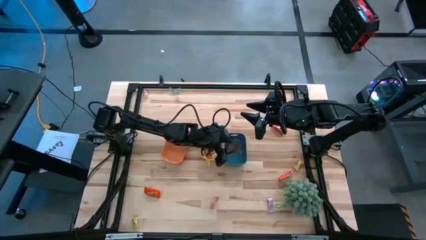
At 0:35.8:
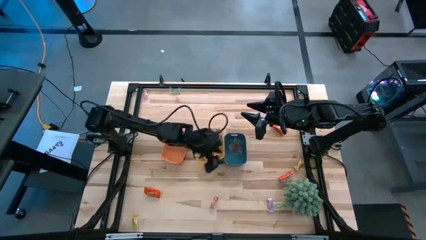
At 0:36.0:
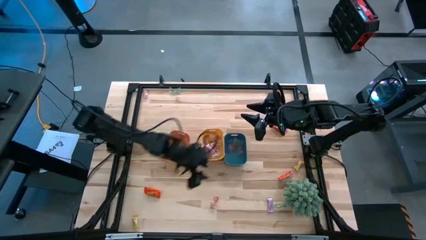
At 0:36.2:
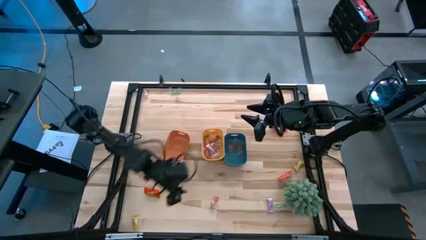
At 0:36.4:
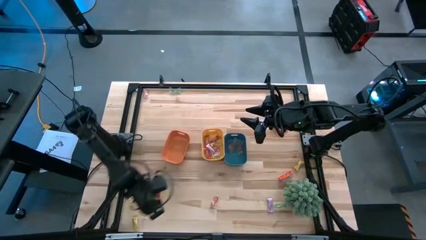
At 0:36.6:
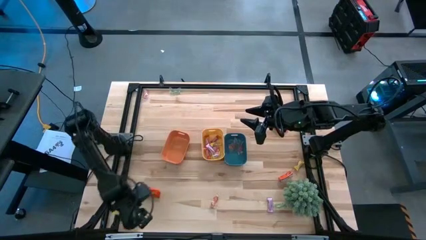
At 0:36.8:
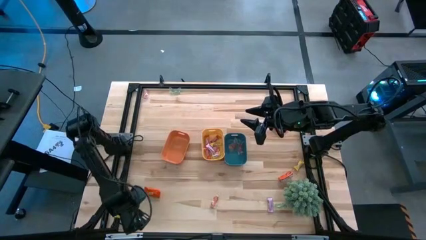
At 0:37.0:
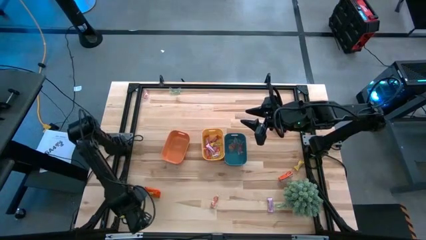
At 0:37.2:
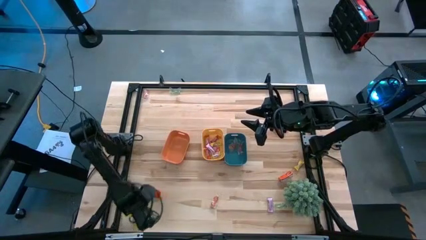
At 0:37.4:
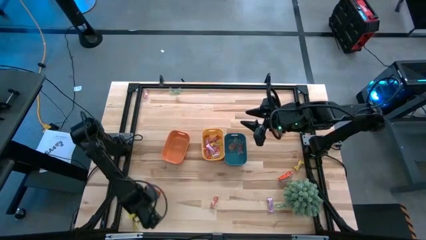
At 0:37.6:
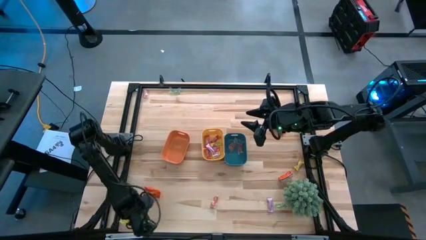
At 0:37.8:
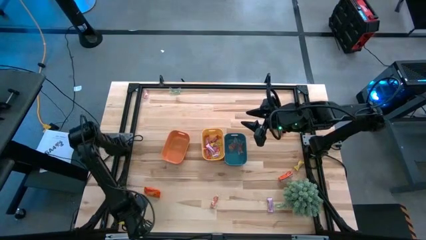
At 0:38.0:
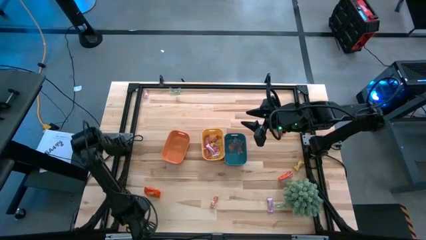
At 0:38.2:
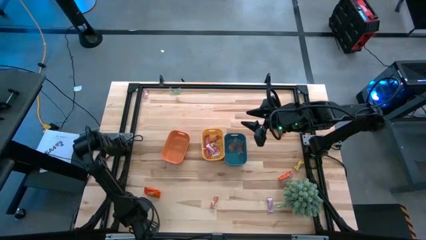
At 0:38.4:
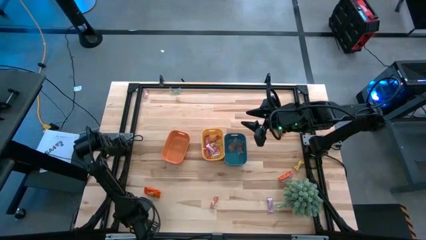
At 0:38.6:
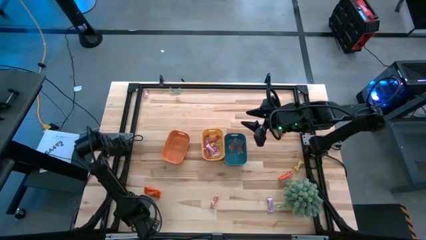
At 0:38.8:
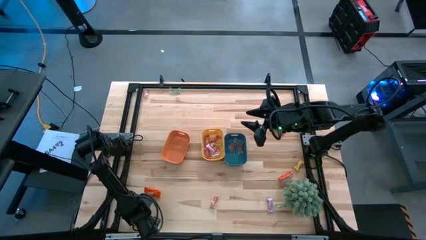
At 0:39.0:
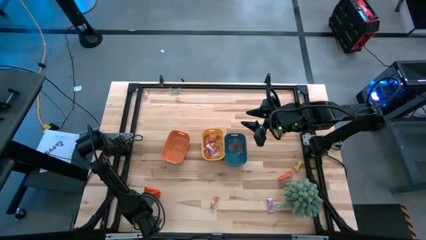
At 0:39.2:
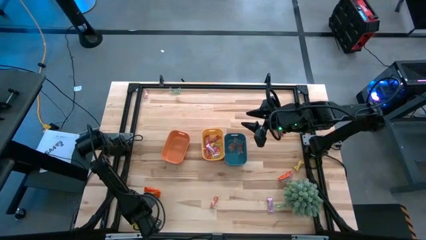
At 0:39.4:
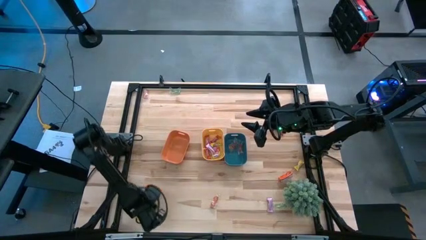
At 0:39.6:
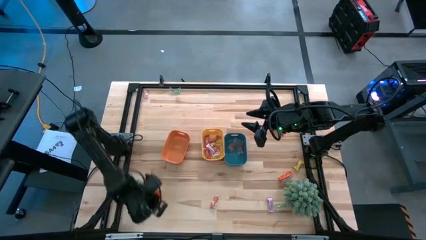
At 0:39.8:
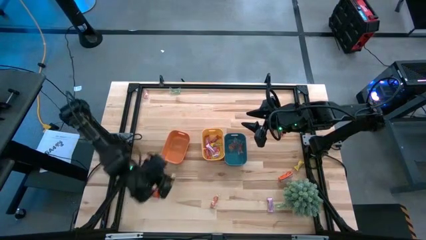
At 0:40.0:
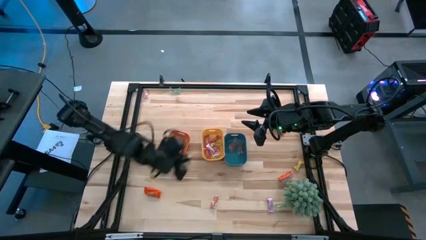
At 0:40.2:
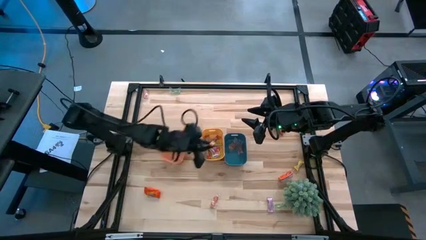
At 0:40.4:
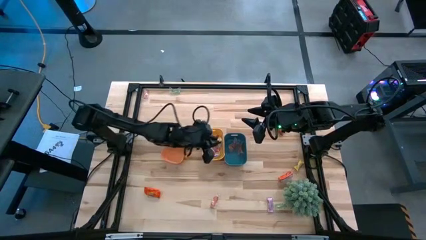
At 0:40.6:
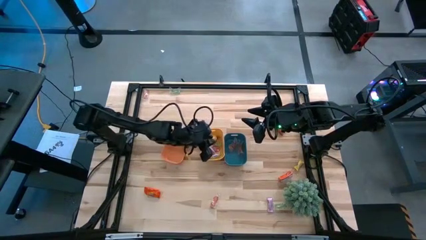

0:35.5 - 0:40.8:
Task: Sort candy
Put the yellow candy into the yellow bin

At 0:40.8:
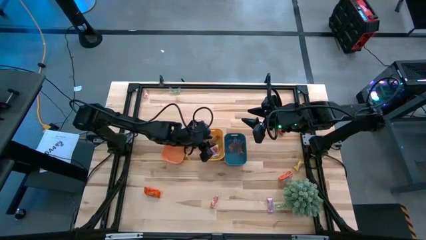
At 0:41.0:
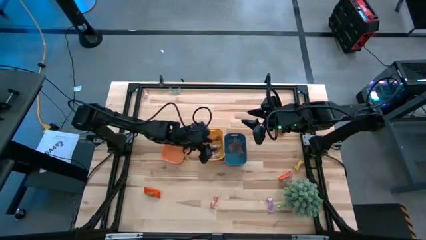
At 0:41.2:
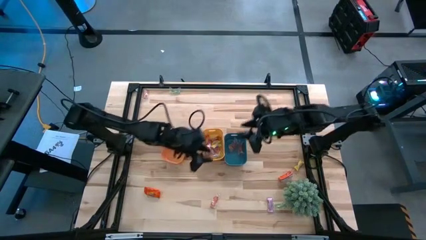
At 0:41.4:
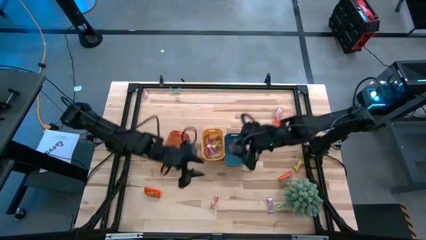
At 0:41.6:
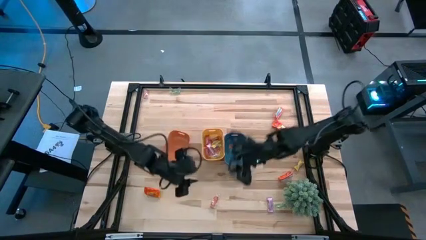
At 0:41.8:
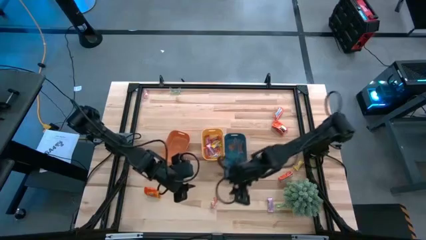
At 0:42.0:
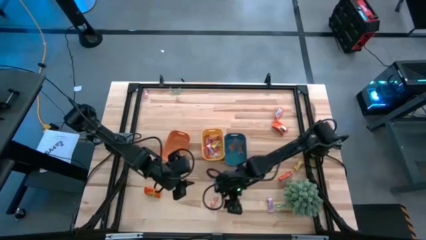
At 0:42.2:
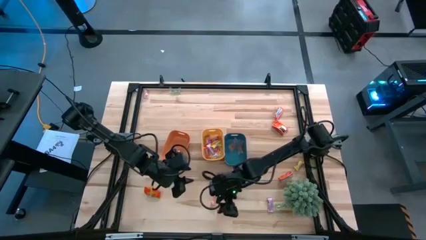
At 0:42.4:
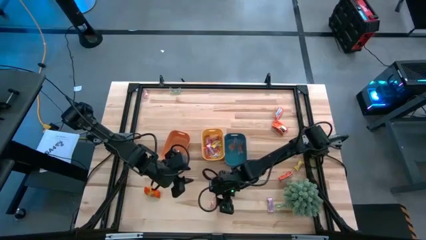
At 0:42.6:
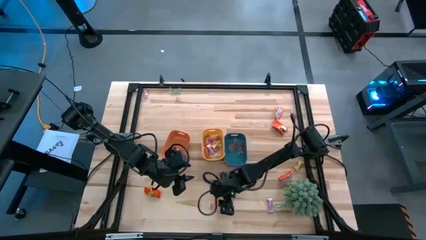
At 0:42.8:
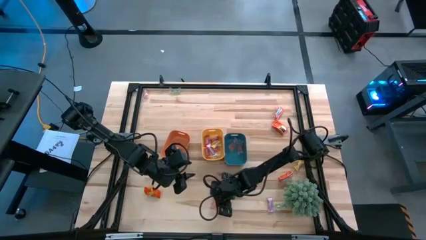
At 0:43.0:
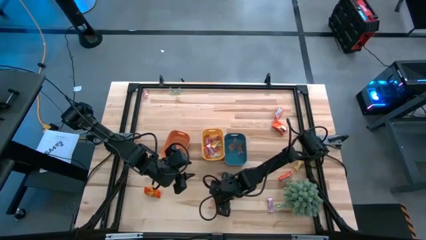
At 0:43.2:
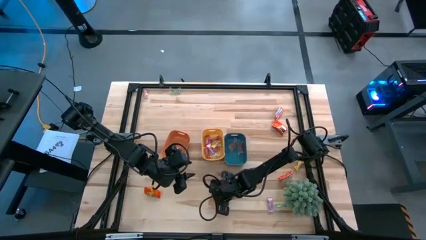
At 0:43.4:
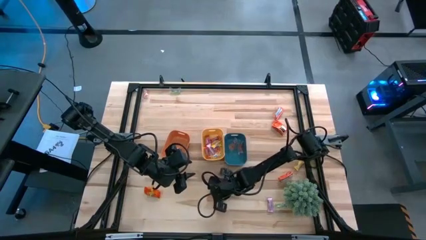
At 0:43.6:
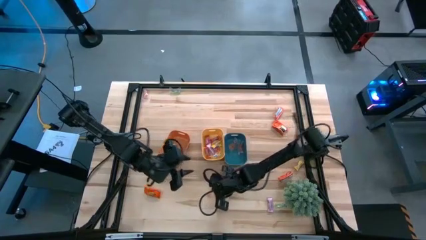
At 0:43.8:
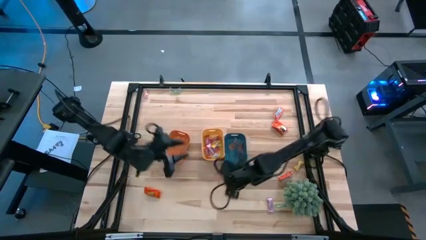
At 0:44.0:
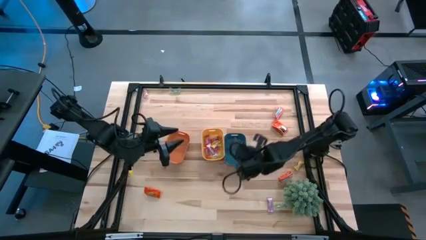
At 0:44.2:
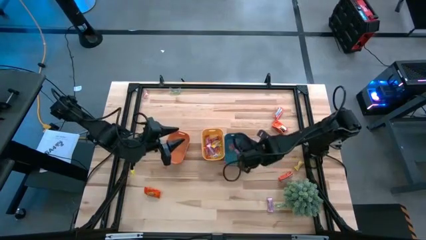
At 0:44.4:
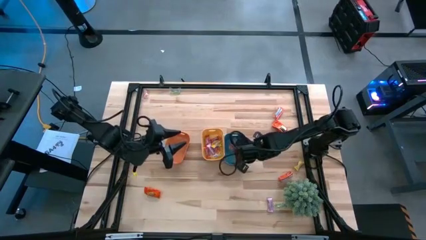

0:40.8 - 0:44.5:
Put the orange gummy into the blue bin

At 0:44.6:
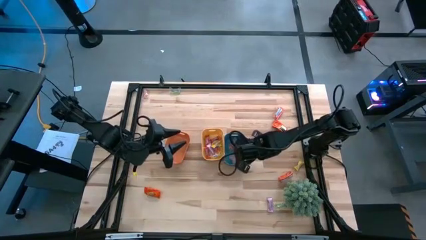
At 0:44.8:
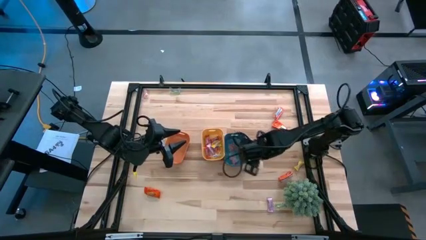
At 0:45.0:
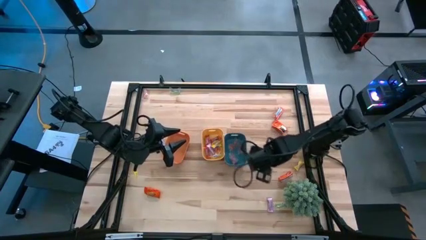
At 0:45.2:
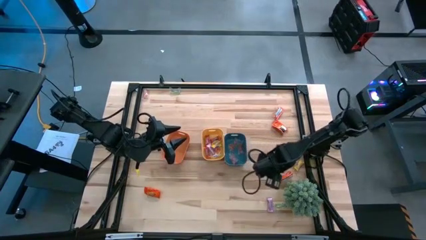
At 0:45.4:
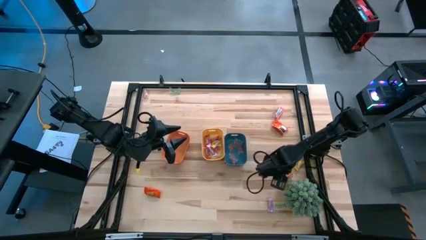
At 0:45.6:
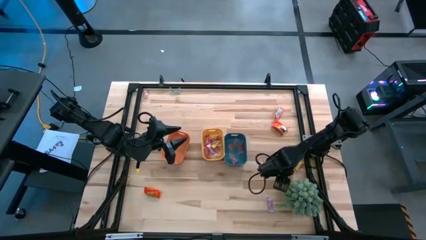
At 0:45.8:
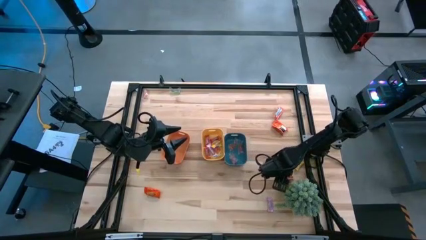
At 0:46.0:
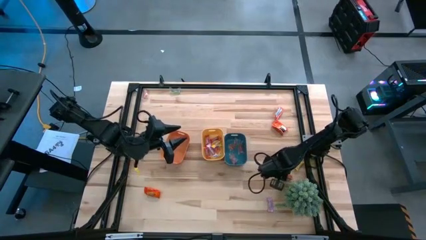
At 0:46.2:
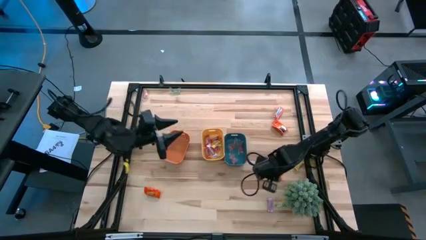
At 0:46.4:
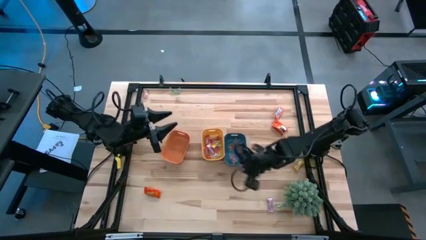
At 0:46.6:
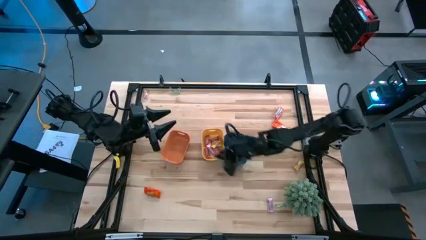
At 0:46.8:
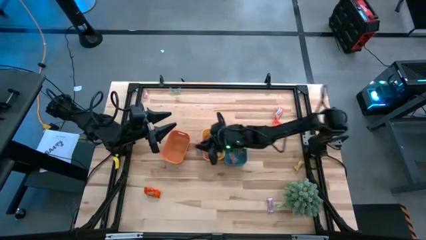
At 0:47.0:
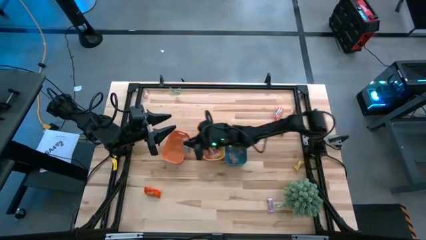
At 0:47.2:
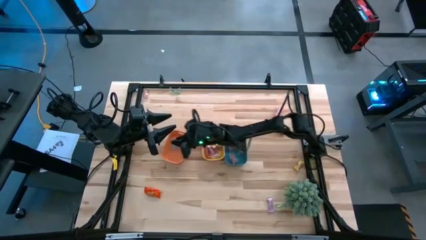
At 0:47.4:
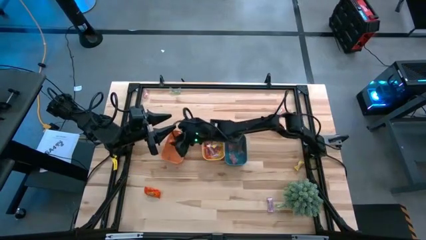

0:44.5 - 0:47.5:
Put the orange chocolate into the orange bin

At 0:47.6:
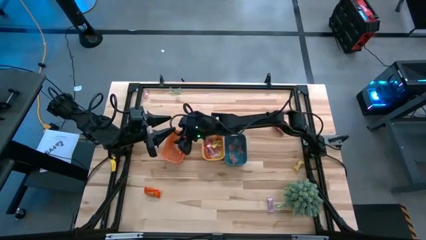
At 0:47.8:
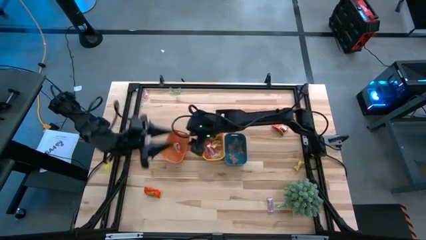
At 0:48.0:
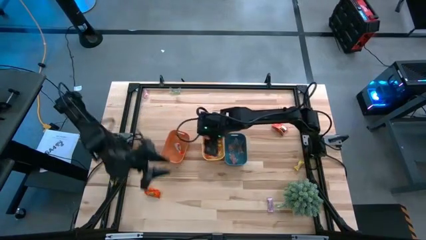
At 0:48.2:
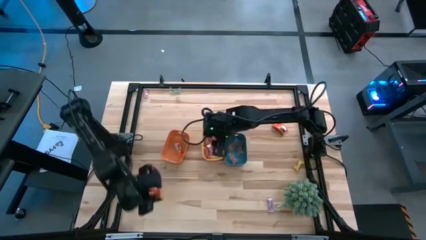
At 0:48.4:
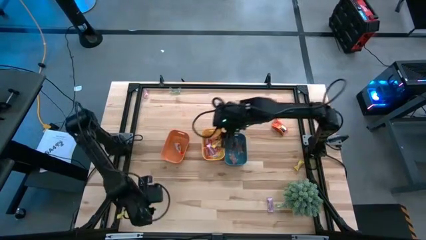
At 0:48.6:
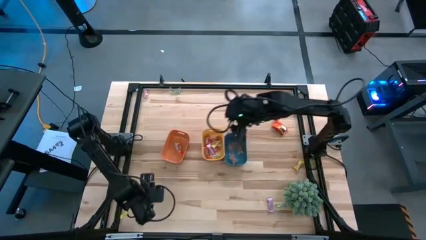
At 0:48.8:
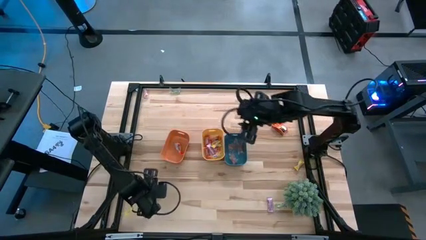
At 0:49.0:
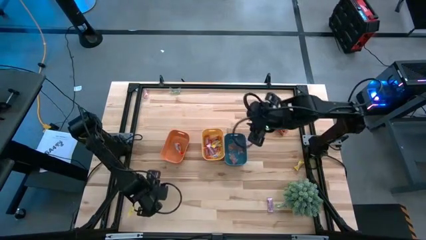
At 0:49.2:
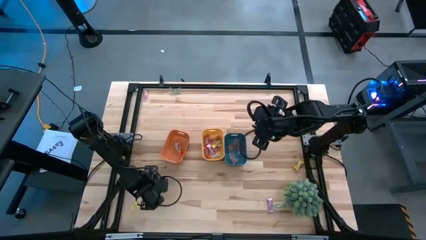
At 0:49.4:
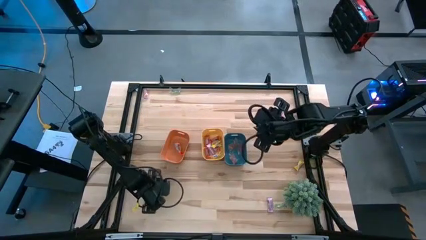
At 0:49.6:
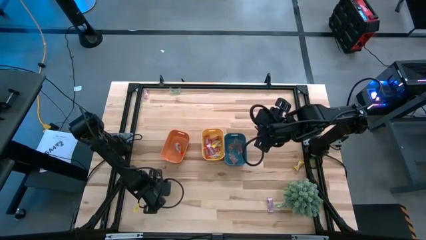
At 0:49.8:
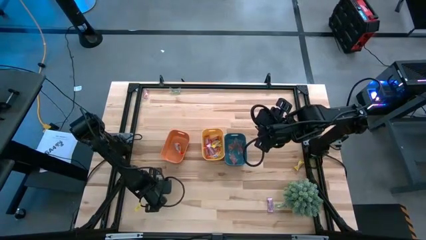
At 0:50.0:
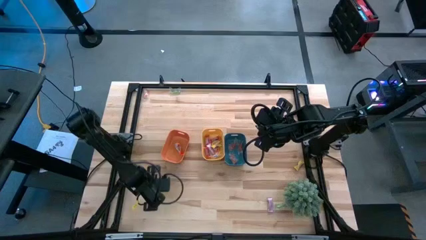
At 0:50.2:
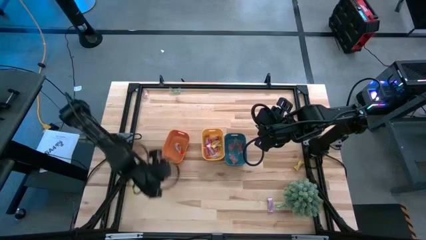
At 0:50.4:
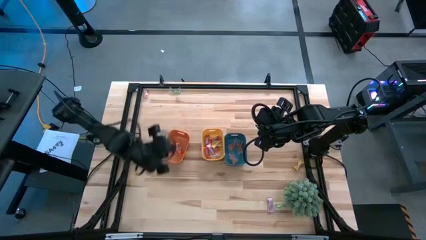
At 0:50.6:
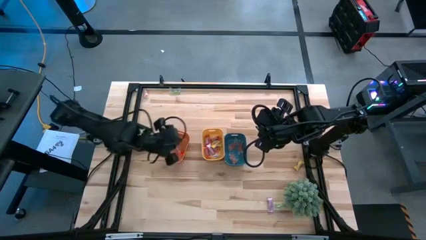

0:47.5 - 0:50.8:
Put the orange chocolate into the orange bin

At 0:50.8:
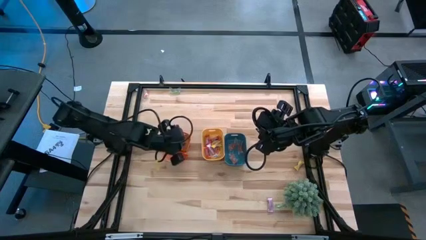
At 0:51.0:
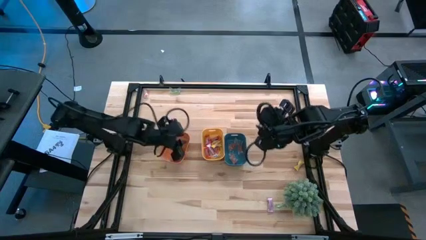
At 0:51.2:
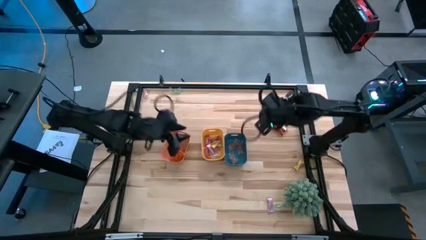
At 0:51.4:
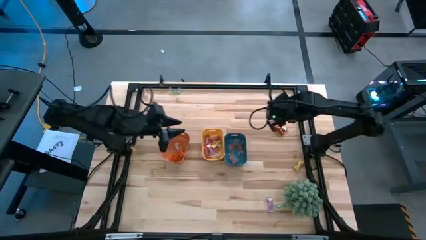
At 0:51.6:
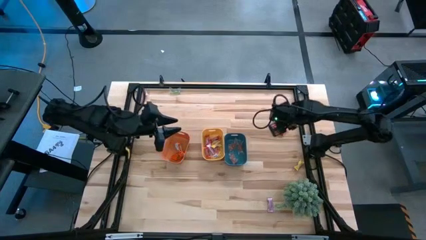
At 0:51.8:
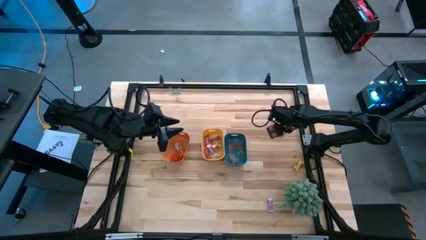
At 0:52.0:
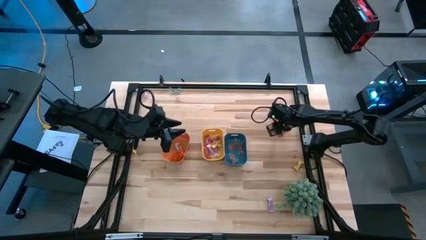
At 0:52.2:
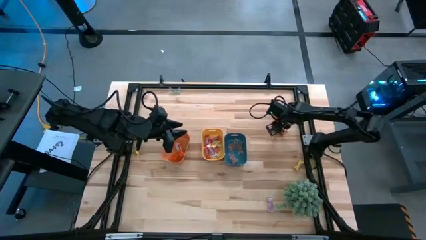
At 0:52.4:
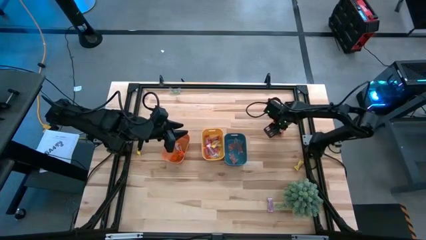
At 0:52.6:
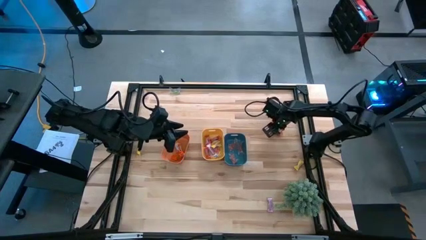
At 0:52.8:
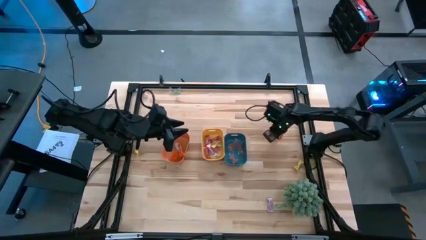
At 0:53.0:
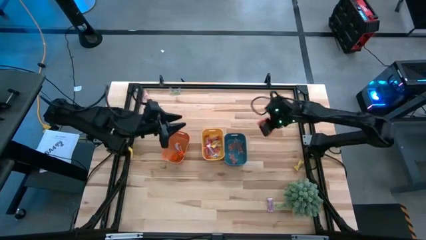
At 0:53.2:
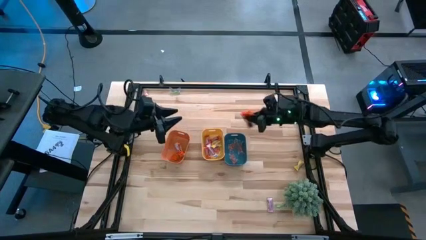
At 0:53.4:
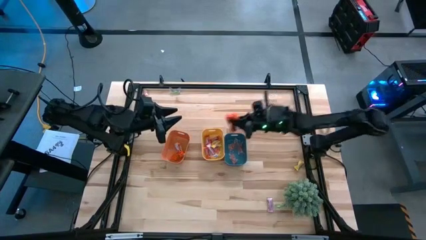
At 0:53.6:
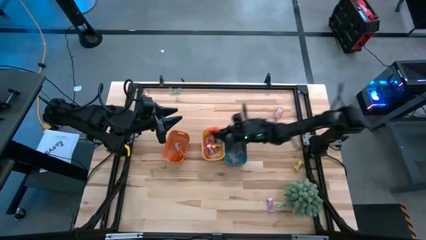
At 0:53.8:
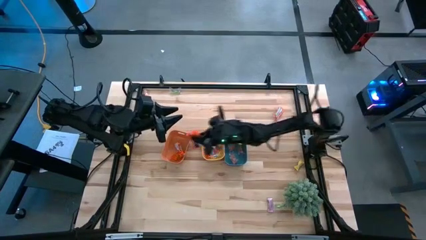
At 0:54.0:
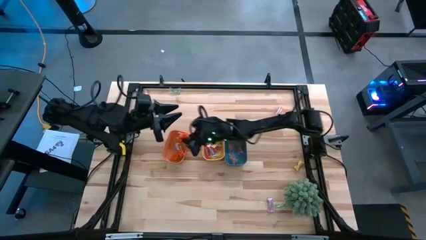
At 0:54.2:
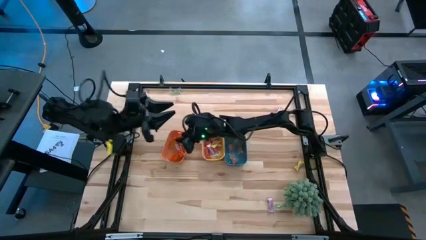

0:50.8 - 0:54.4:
Put the orange chocolate into the orange bin
